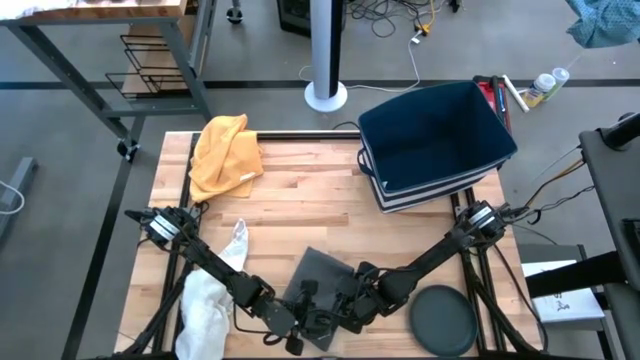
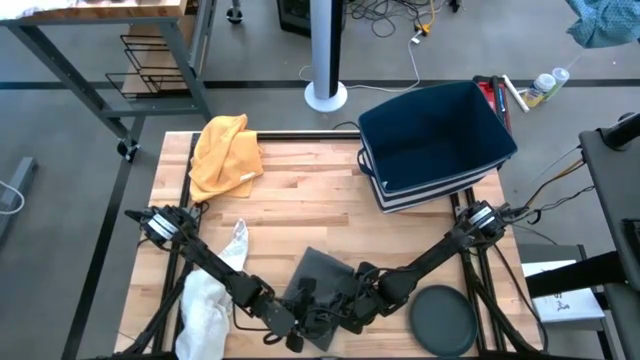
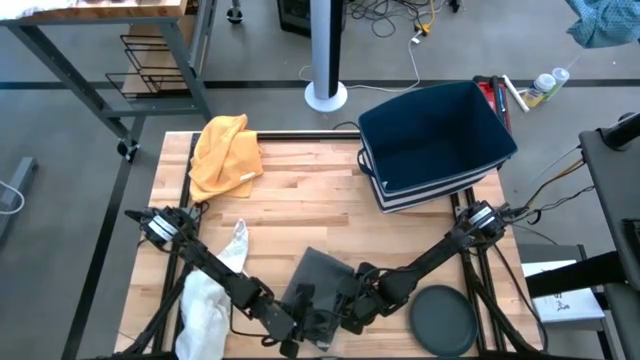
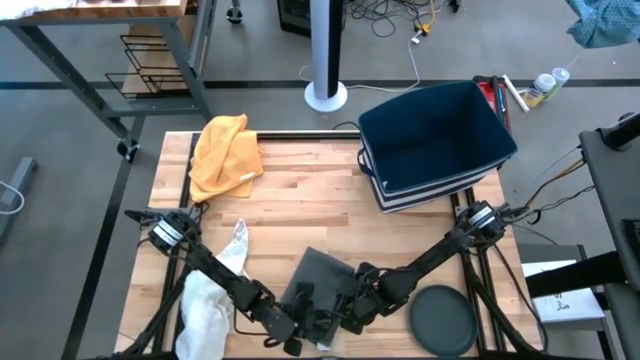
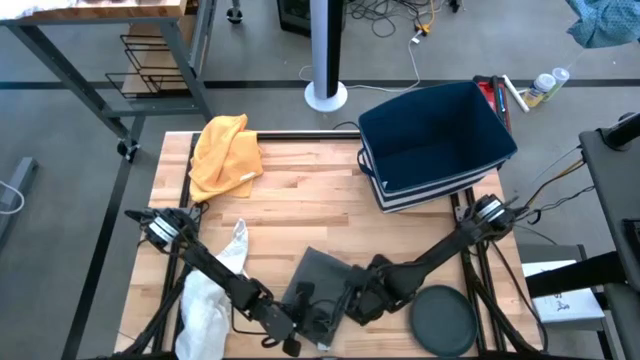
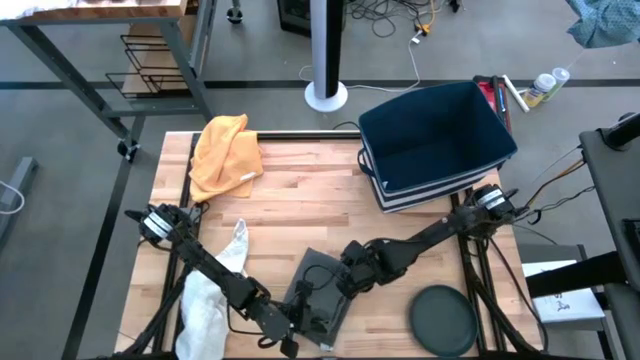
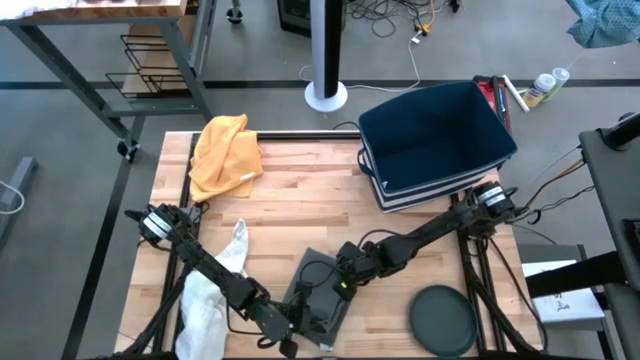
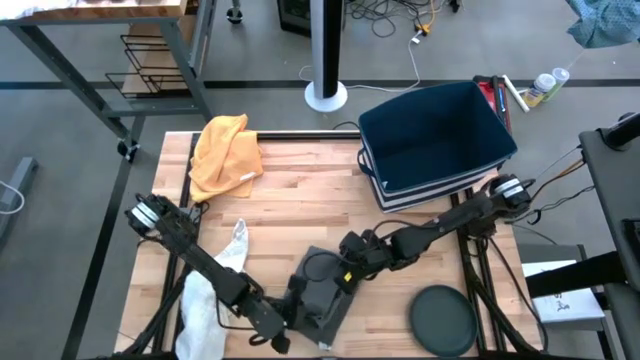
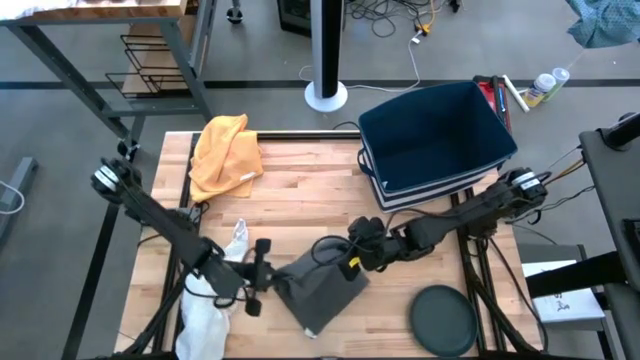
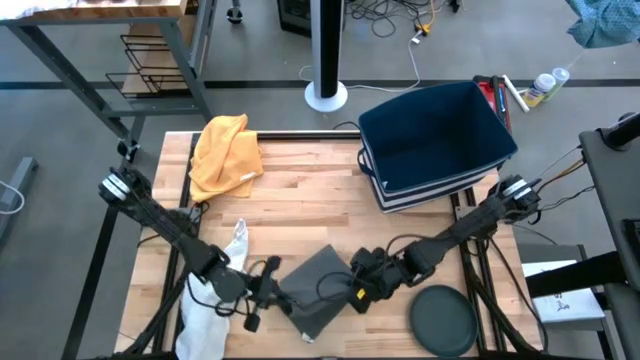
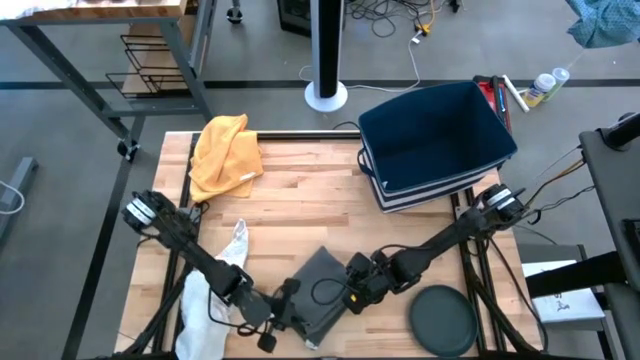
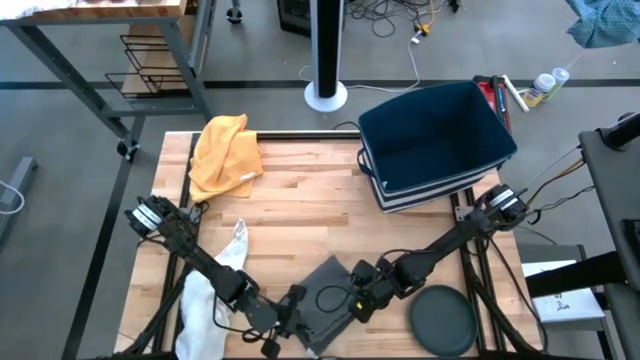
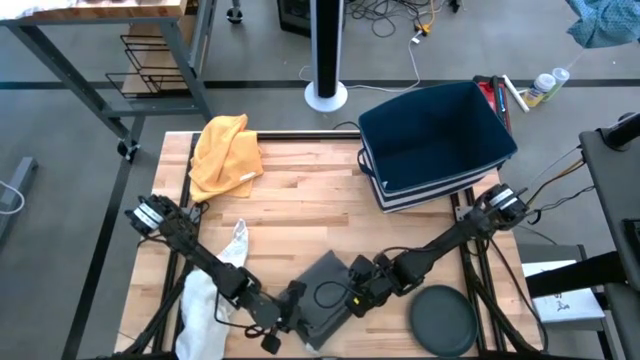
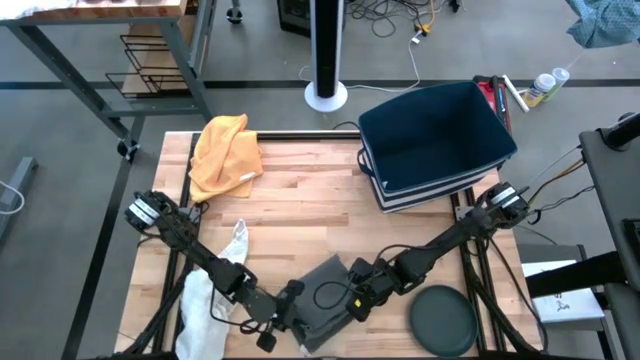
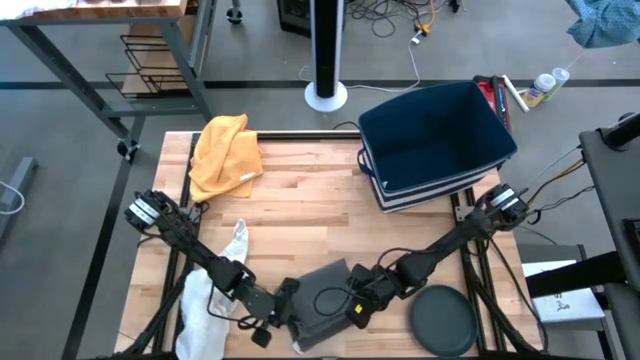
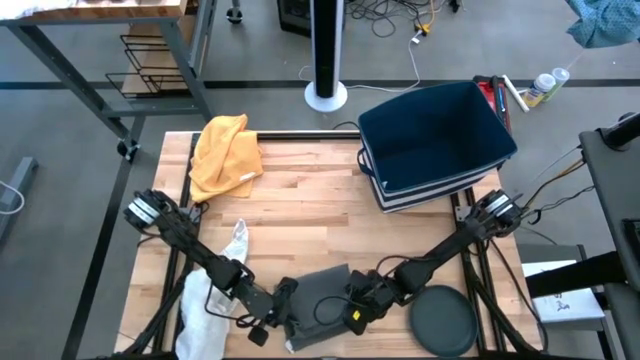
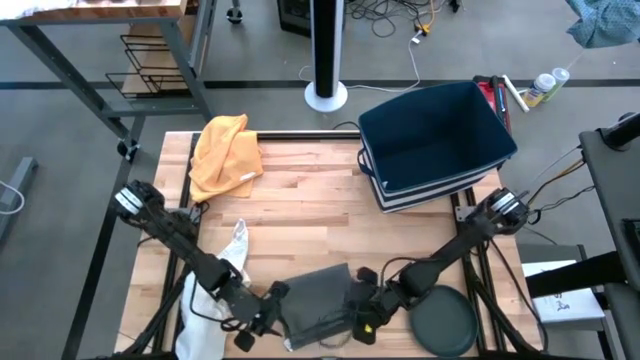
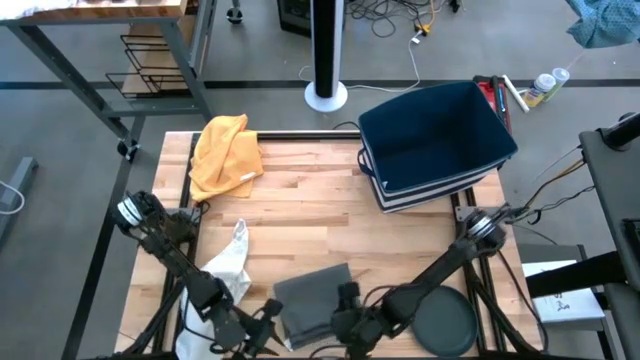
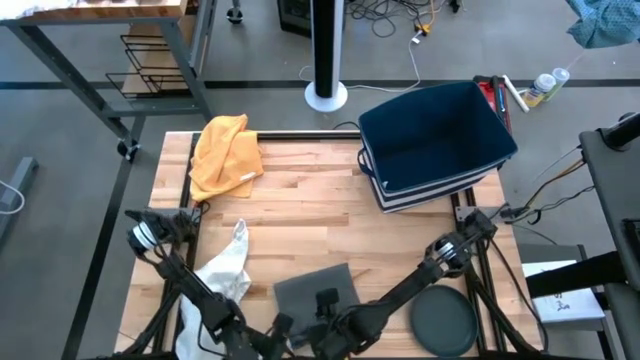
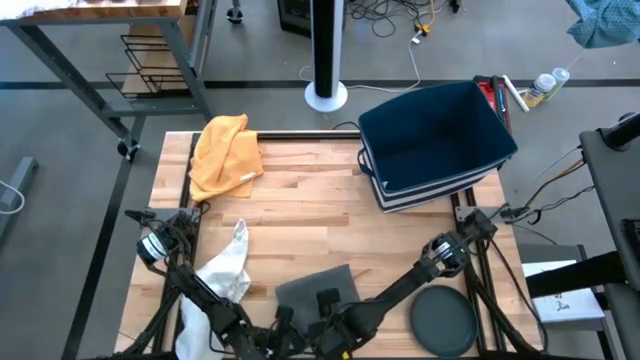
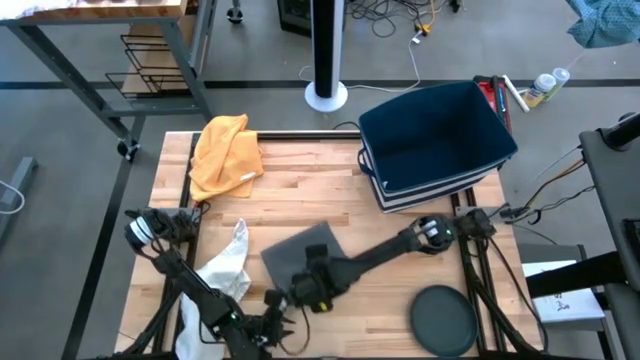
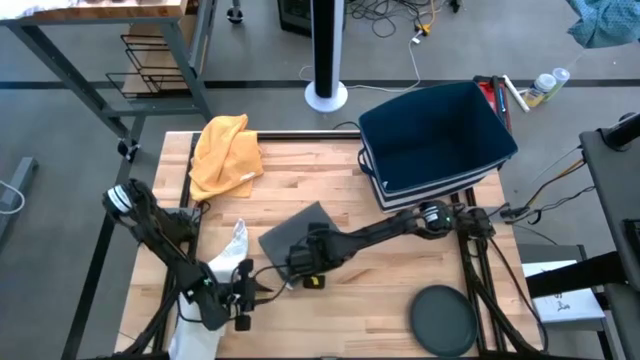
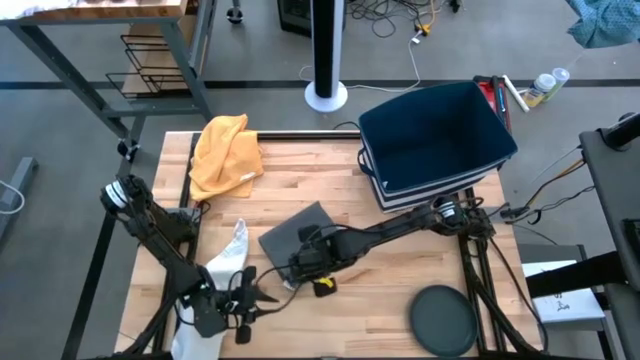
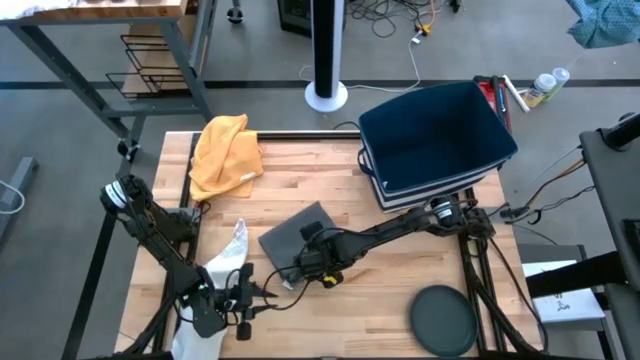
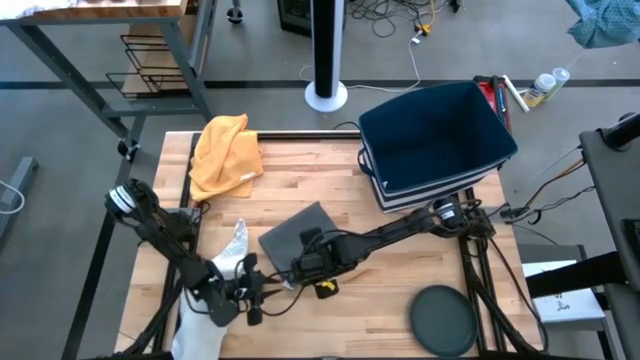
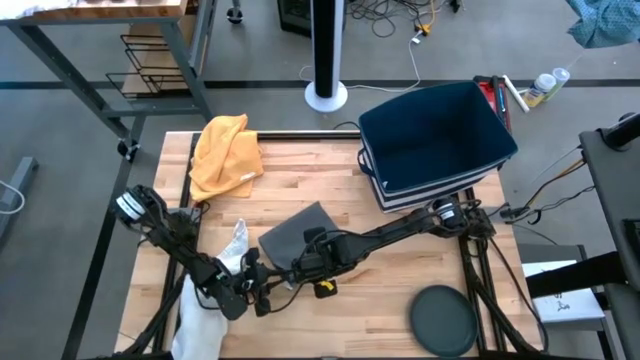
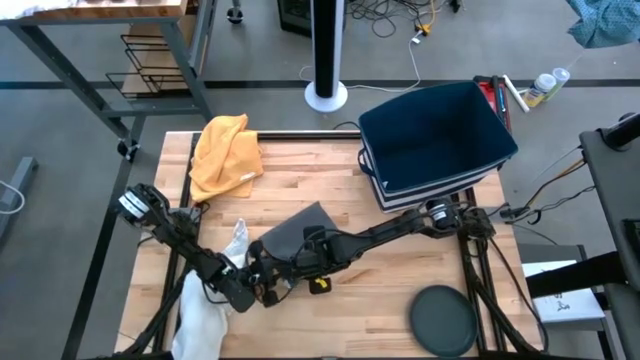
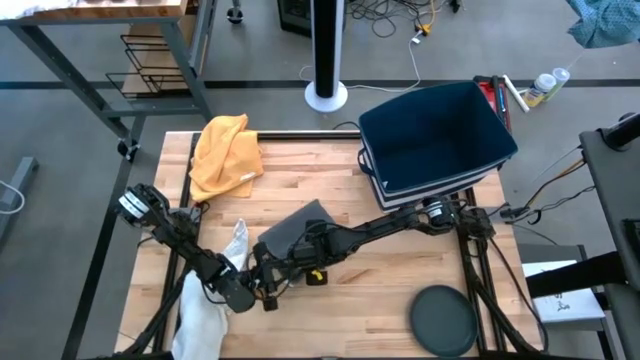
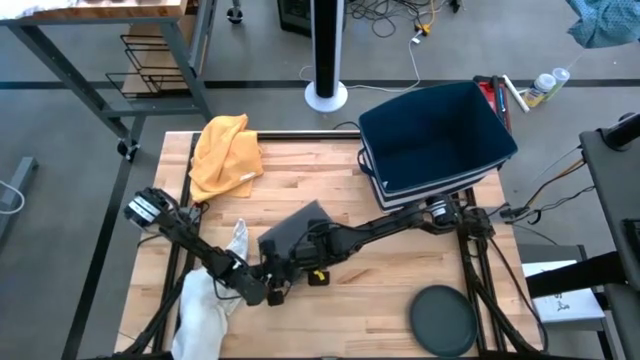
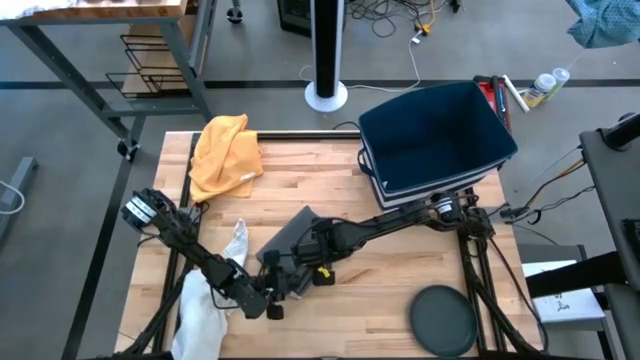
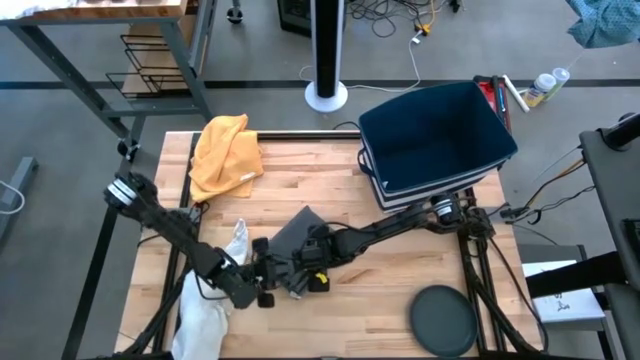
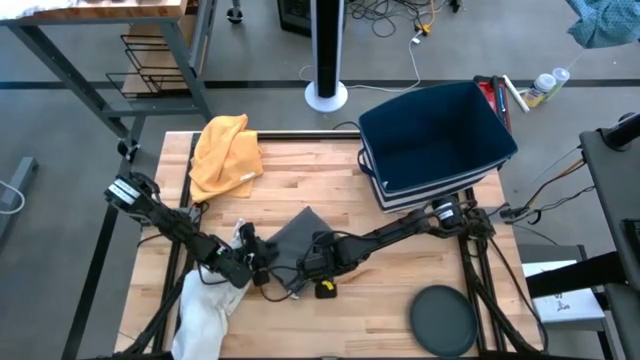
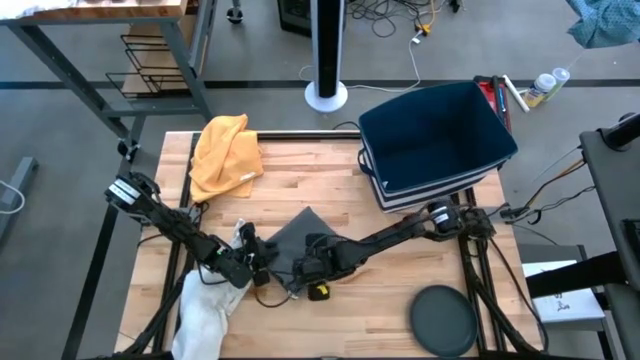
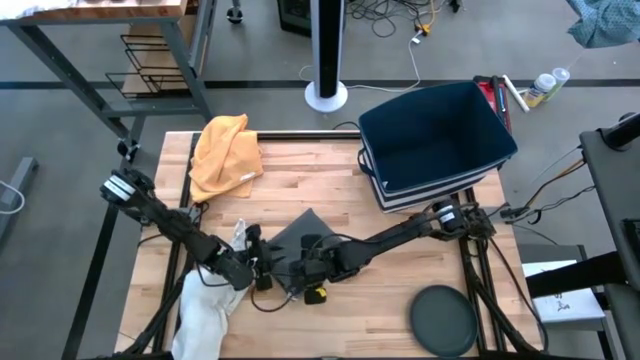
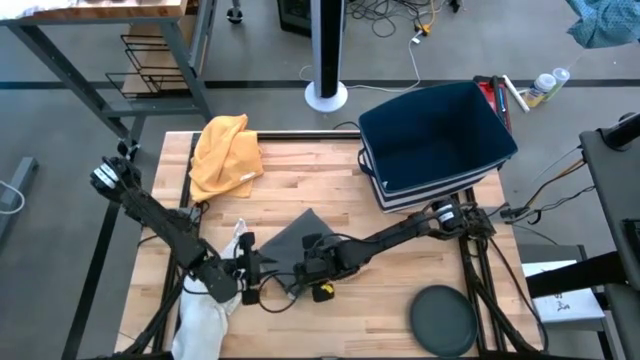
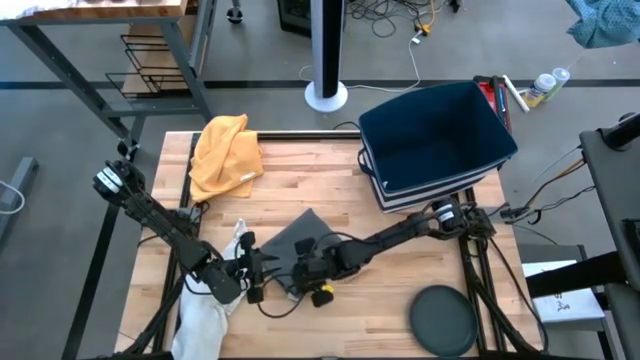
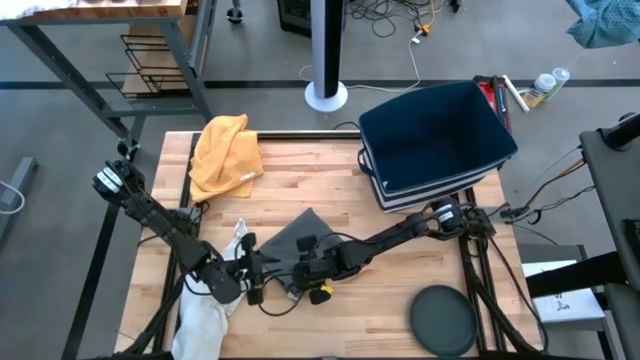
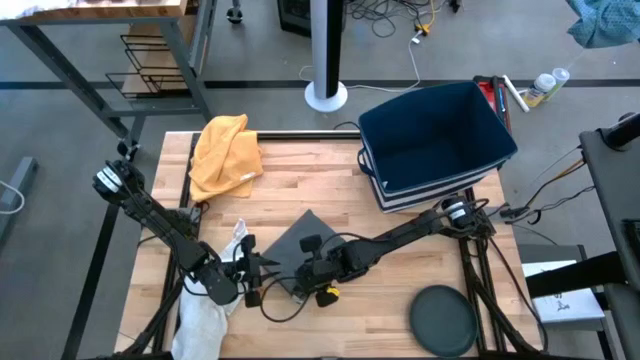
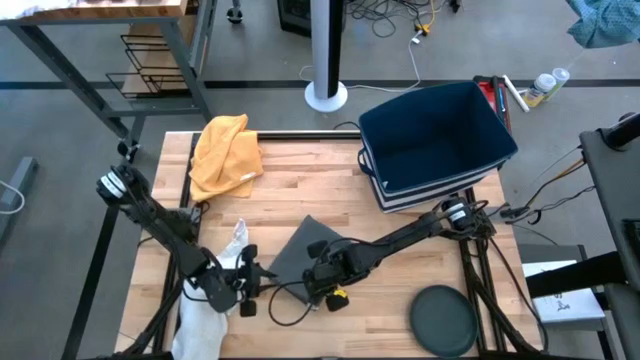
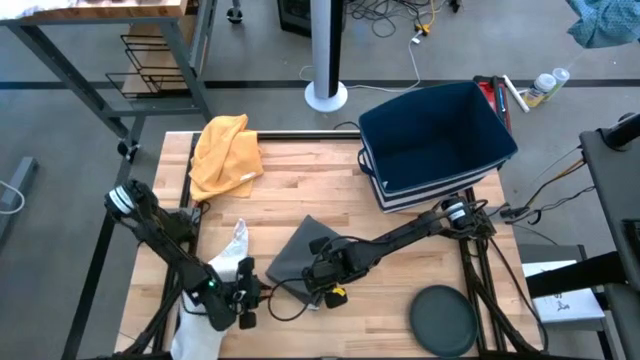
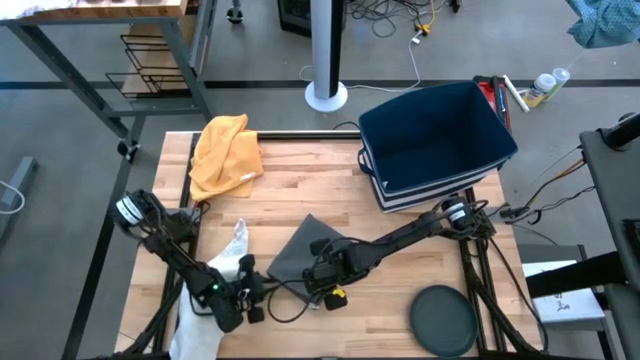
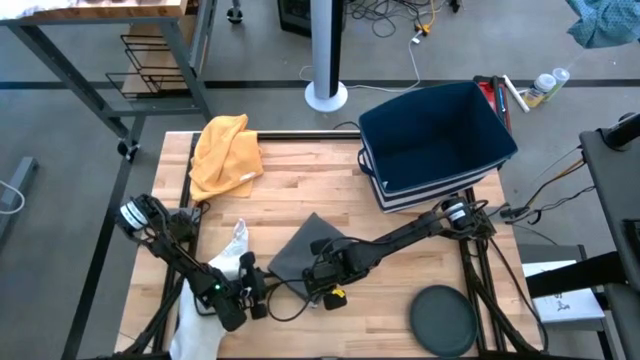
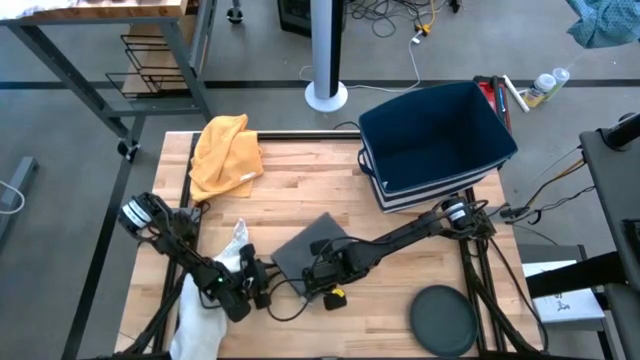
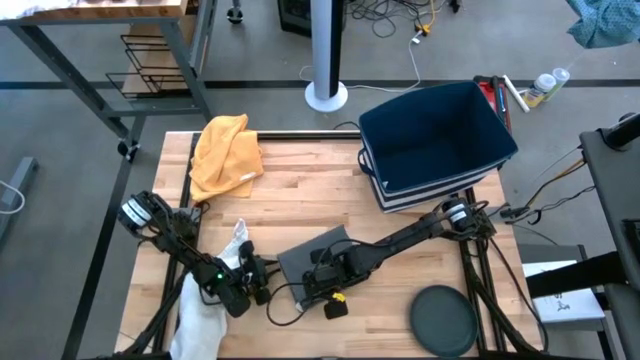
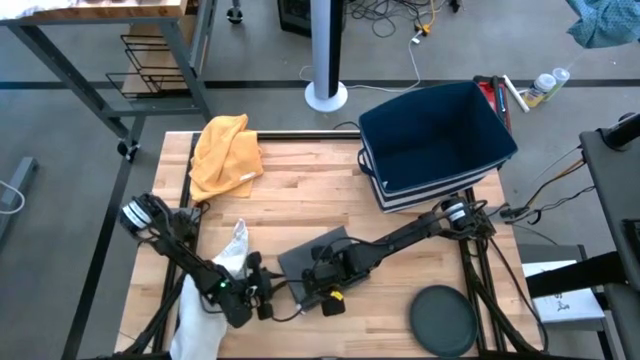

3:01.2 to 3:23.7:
Task: Fold kitchen towel into neat rectangle
Fold the gray towel
